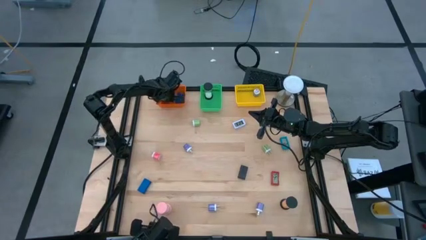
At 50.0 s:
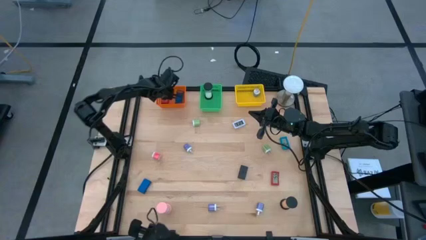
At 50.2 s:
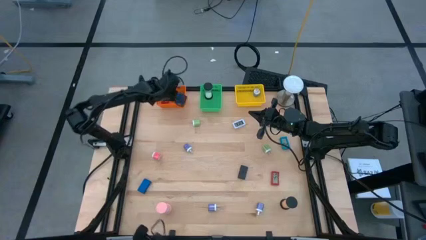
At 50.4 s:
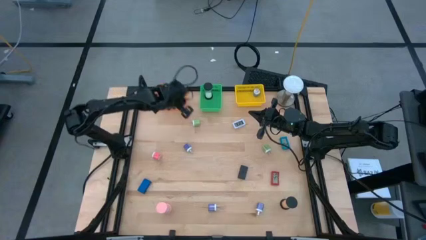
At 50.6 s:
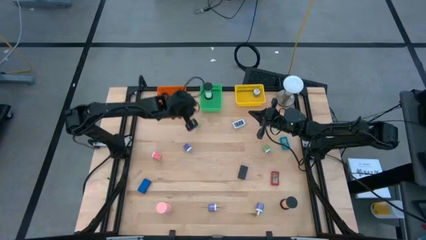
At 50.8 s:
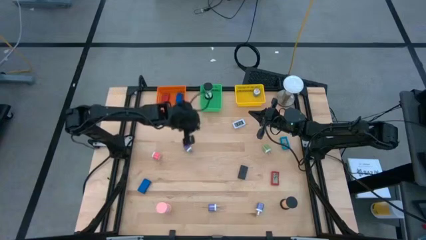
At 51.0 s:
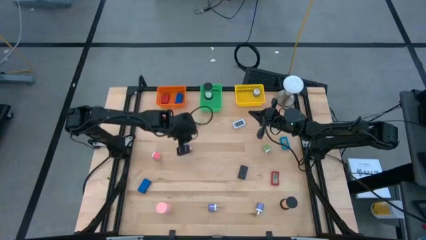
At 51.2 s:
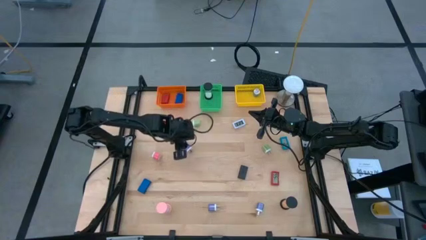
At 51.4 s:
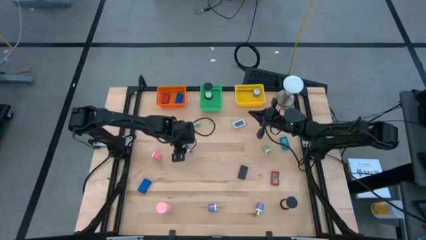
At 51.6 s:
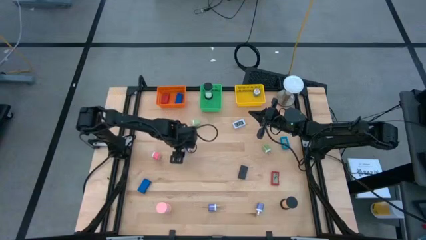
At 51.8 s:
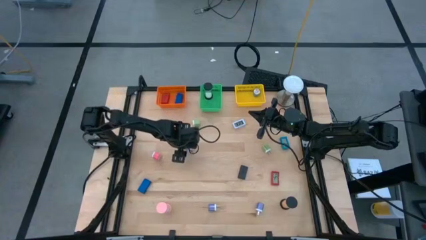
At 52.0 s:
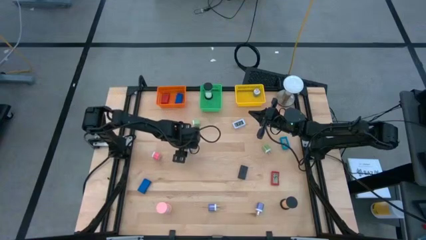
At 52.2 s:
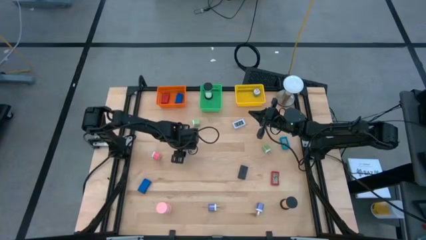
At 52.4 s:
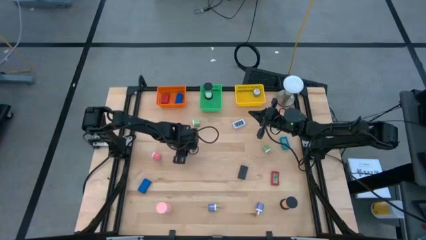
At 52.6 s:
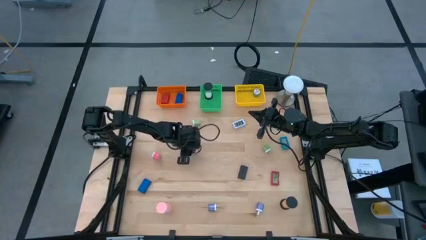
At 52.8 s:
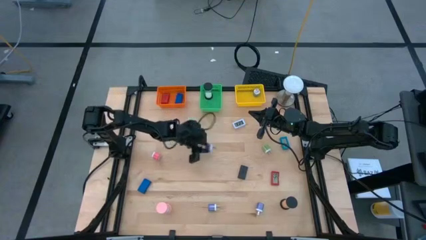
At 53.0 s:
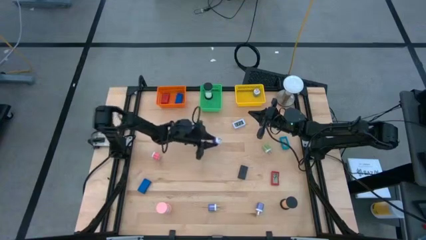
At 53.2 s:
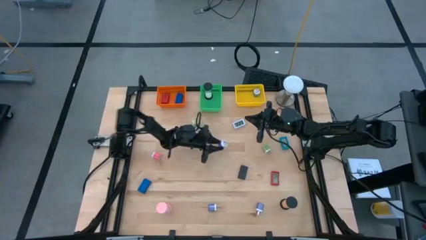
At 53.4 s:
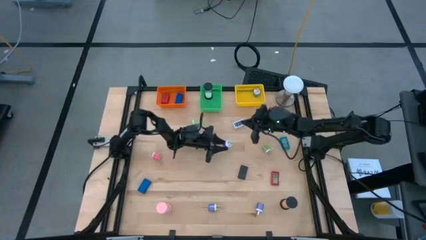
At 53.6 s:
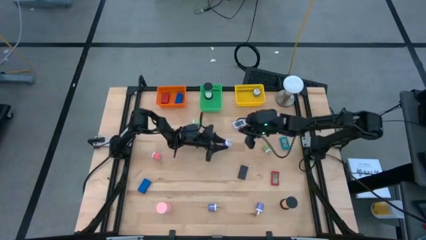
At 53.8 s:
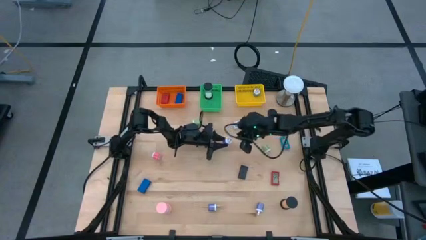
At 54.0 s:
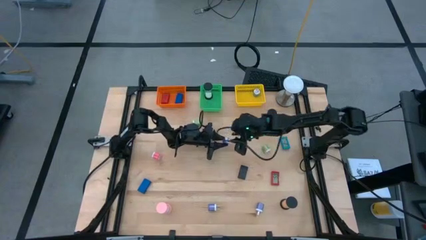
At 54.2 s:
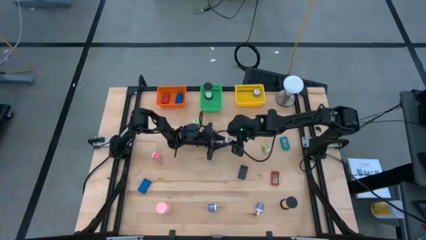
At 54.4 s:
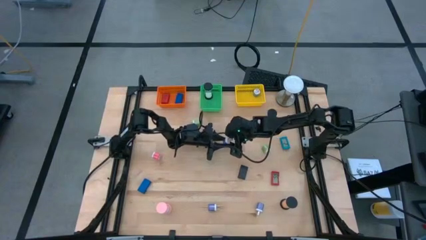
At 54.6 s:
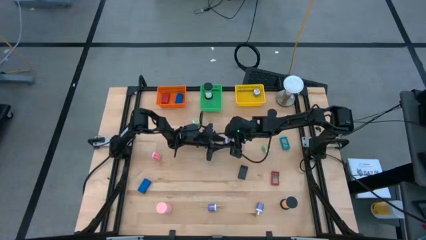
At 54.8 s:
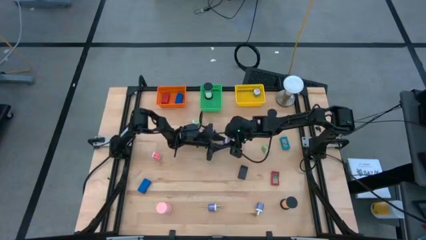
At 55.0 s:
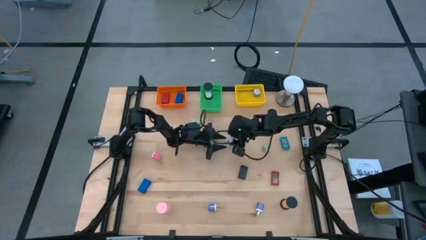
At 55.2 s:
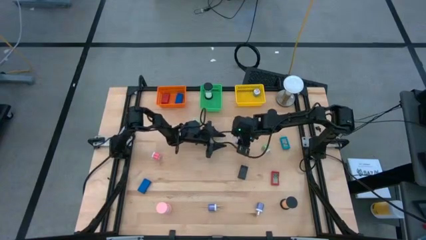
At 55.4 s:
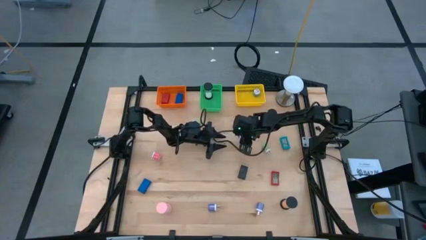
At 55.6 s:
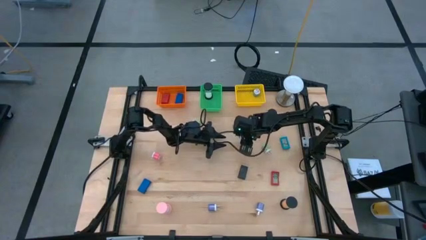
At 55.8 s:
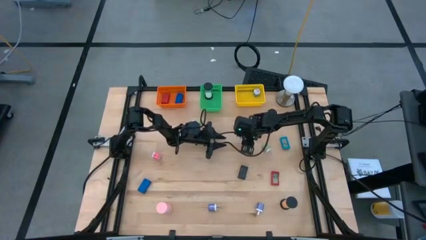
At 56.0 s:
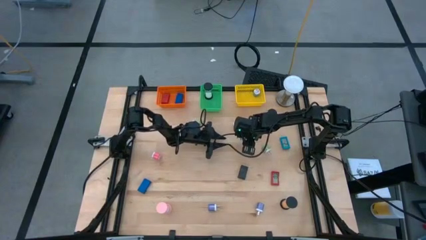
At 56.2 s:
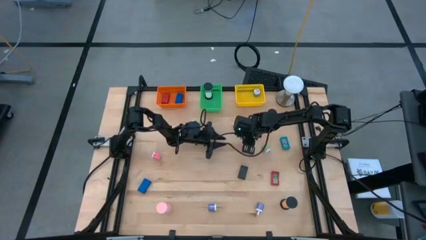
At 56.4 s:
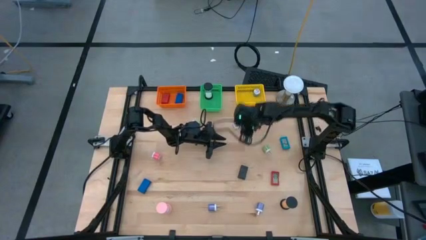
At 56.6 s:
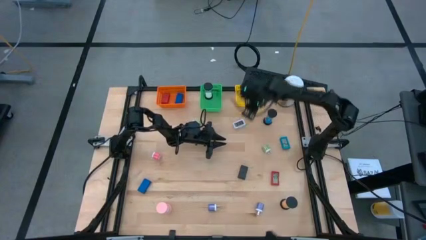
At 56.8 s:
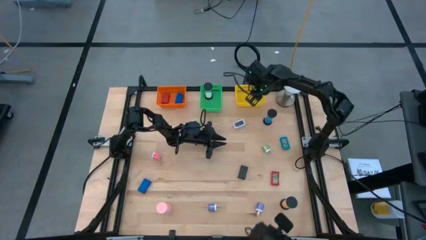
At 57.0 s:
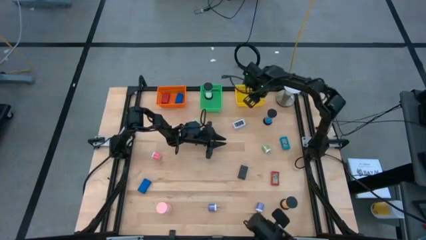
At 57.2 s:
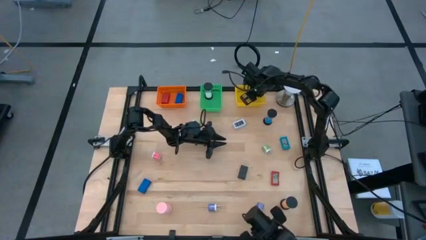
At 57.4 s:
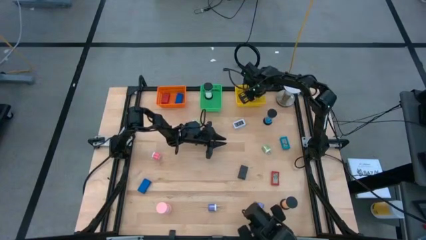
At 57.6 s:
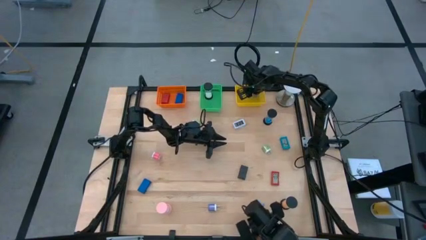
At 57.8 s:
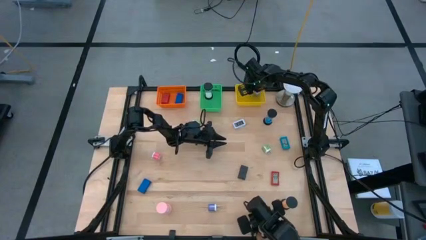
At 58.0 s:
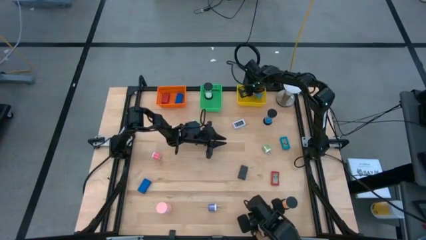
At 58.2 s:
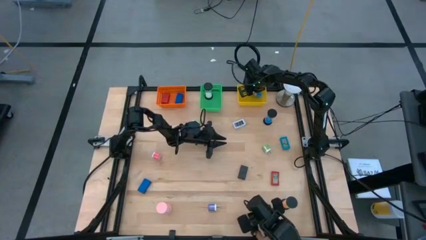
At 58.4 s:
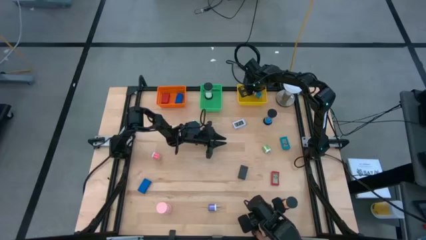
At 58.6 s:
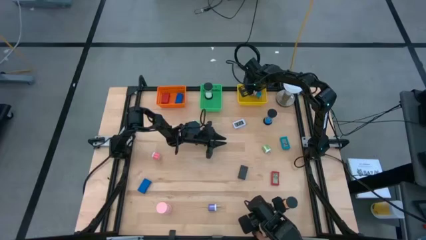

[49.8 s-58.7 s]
Task: Pick & Place Office items
Put the top purple charger adapter into the yellow bin

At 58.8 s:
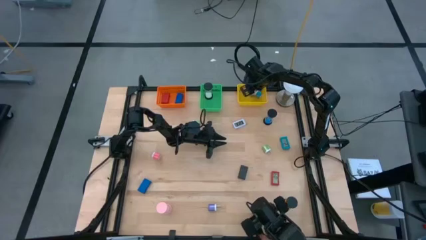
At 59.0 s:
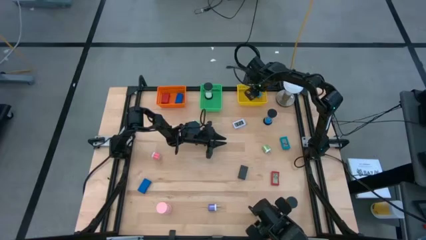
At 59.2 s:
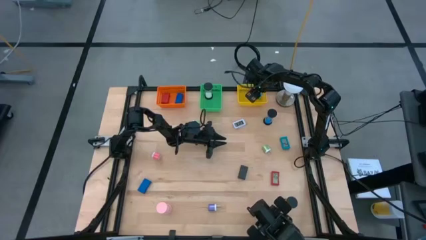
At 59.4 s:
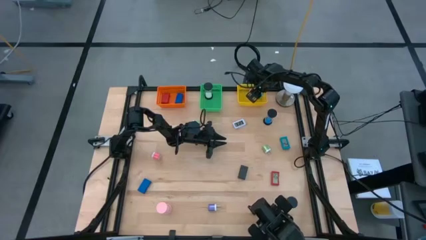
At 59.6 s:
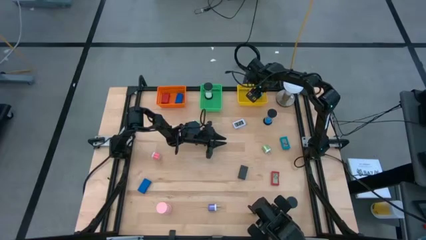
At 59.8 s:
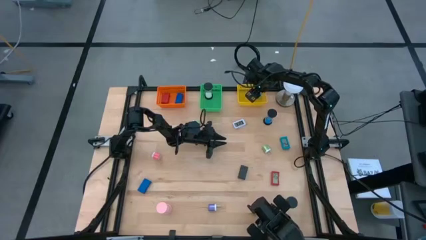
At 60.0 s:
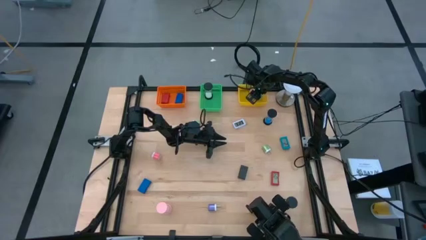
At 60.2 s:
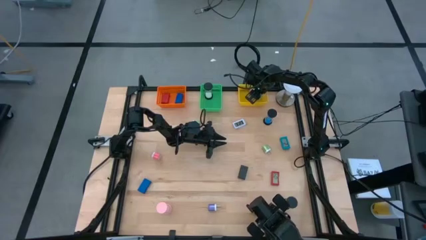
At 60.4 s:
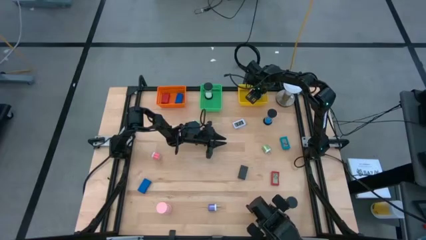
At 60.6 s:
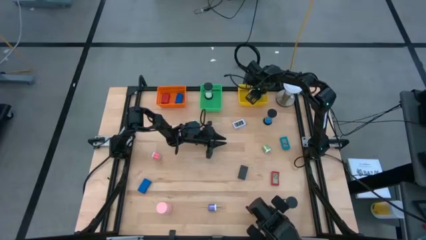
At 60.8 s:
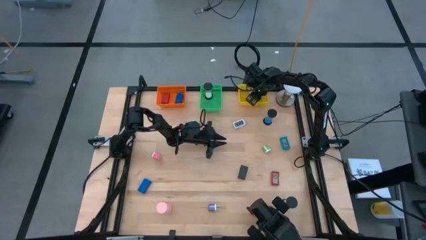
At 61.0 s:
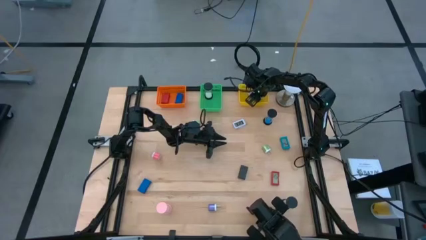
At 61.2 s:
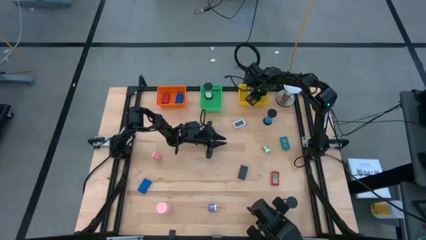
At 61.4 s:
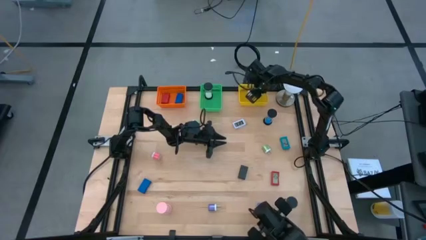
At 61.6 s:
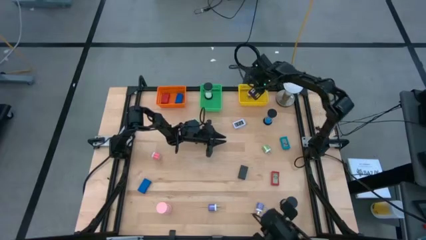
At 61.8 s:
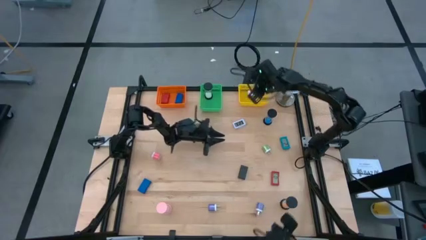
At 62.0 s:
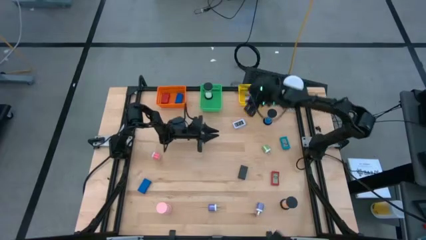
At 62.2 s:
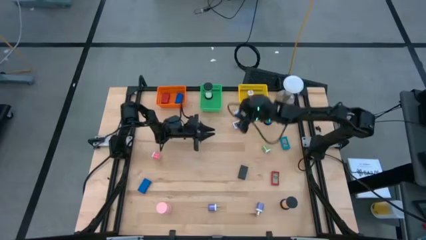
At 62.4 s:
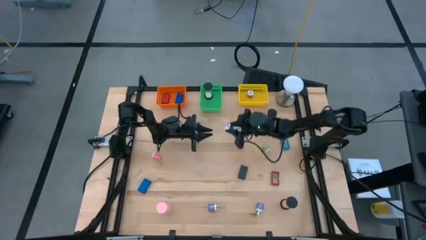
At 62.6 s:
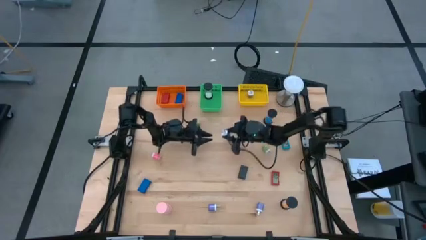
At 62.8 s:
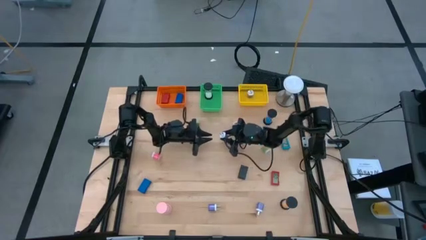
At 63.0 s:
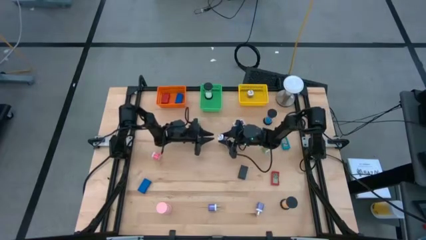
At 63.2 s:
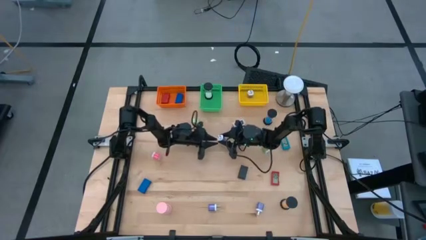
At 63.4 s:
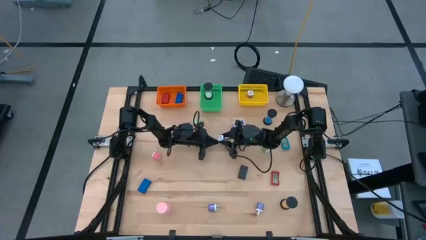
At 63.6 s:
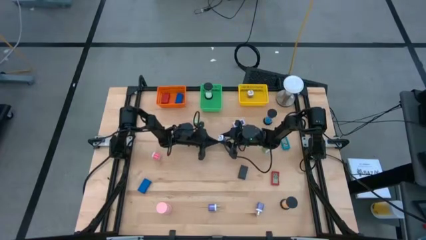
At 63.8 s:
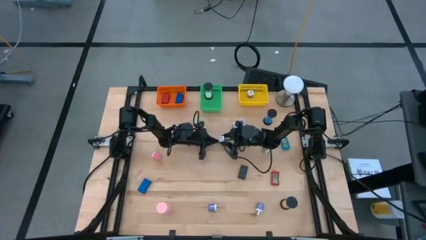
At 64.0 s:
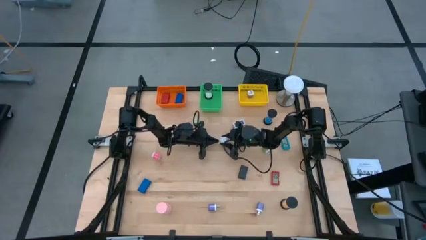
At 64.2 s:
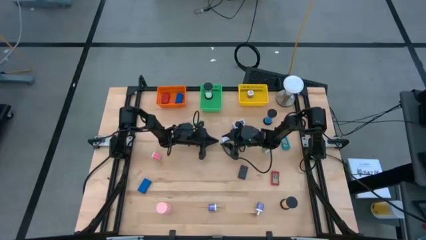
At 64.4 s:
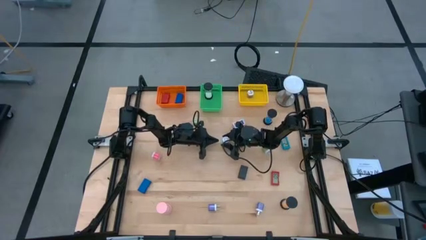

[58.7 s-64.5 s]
Remove the blue charger adapter from the yellow bin to the table
